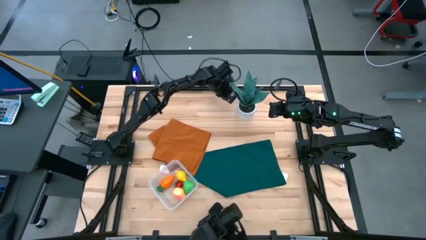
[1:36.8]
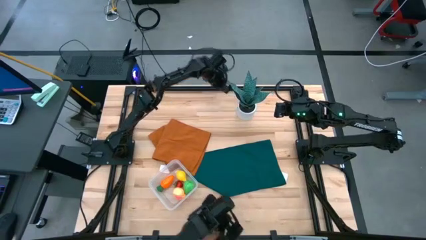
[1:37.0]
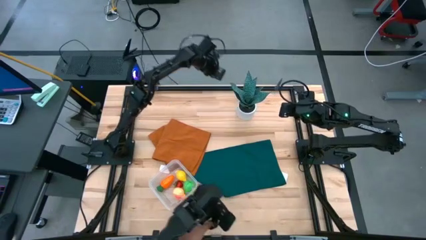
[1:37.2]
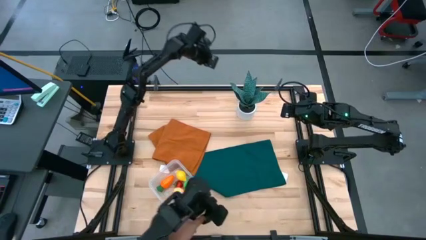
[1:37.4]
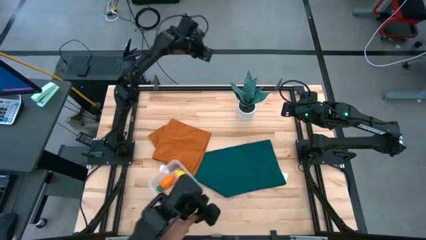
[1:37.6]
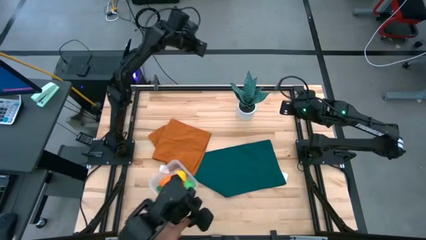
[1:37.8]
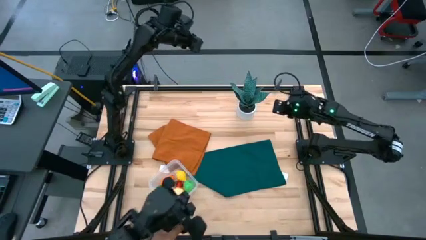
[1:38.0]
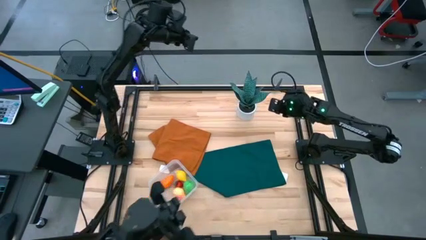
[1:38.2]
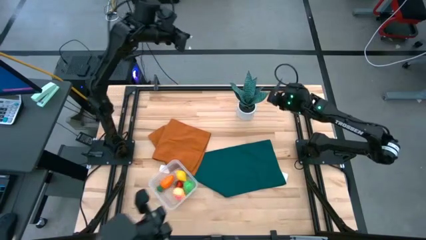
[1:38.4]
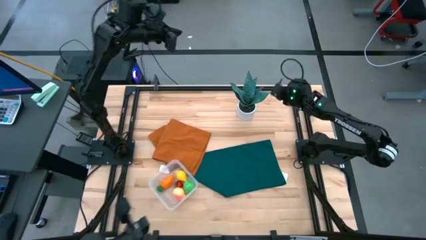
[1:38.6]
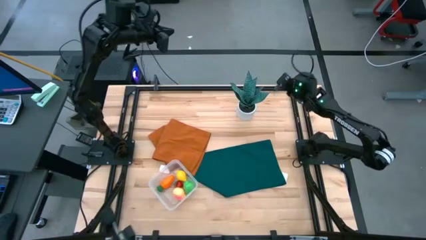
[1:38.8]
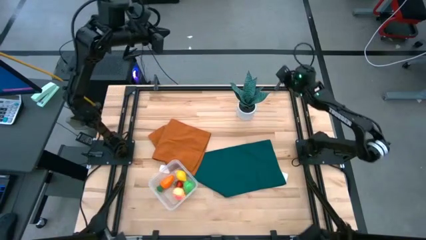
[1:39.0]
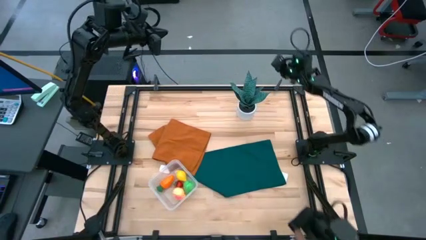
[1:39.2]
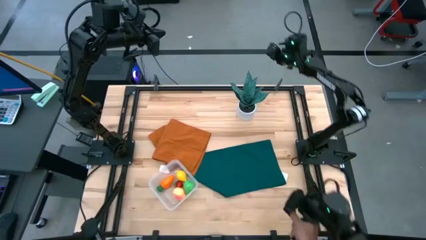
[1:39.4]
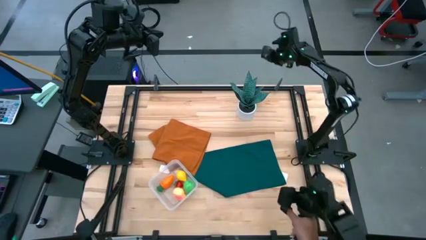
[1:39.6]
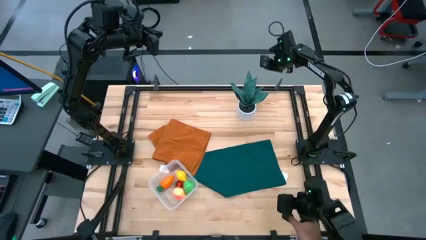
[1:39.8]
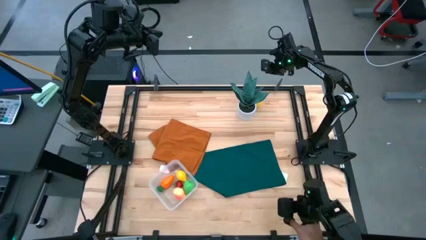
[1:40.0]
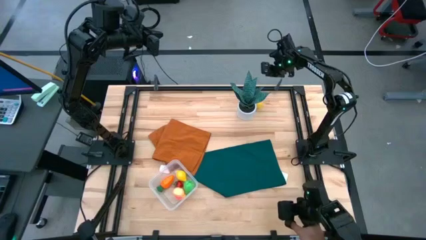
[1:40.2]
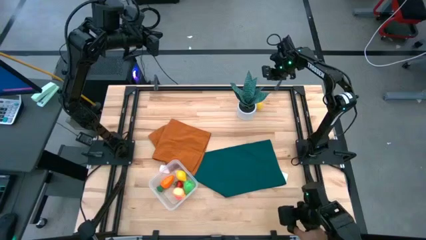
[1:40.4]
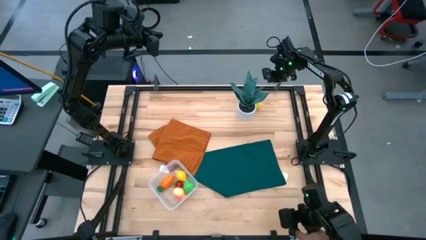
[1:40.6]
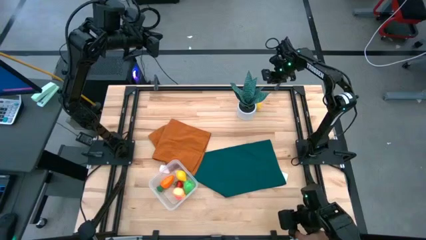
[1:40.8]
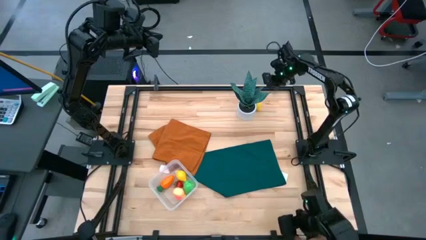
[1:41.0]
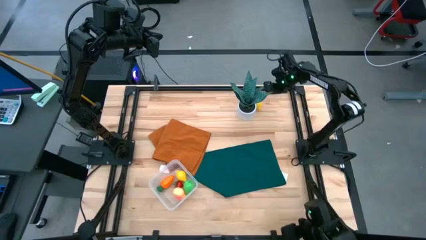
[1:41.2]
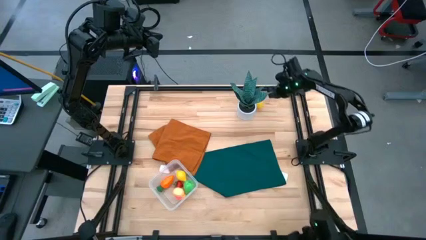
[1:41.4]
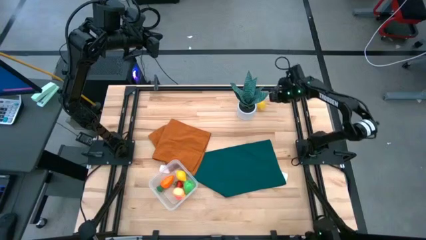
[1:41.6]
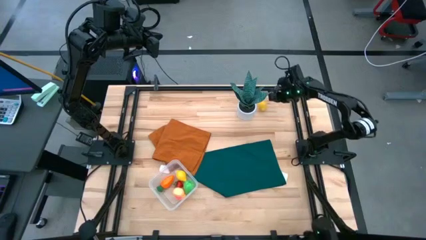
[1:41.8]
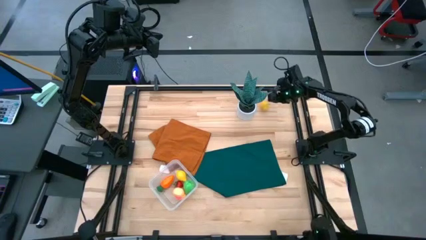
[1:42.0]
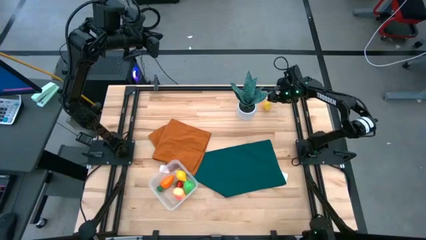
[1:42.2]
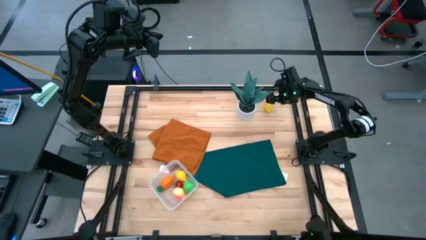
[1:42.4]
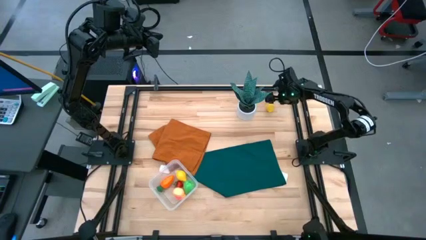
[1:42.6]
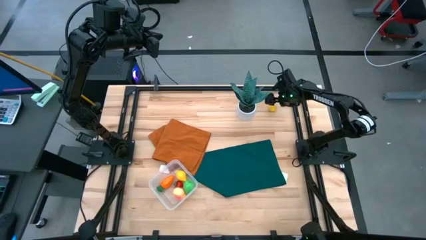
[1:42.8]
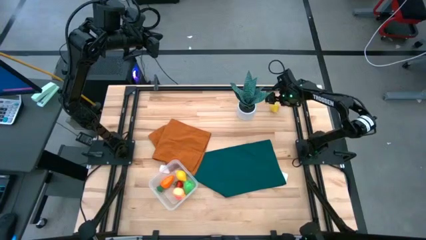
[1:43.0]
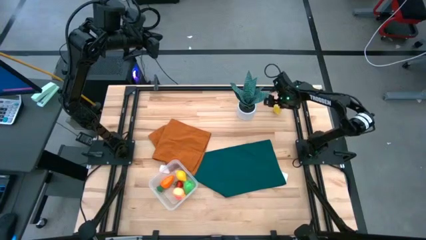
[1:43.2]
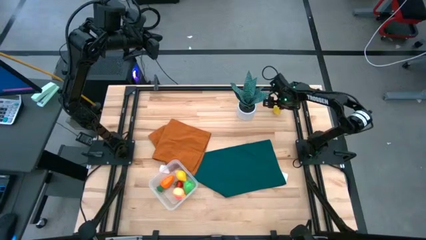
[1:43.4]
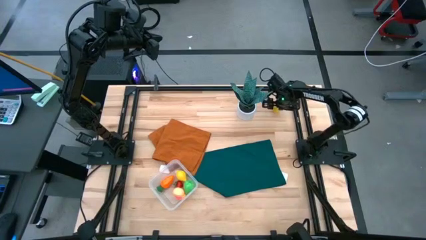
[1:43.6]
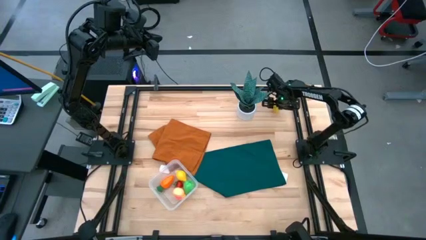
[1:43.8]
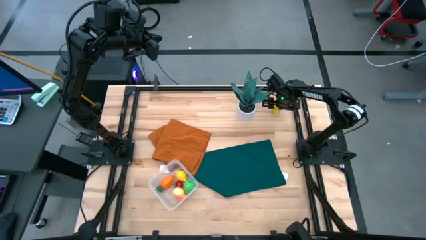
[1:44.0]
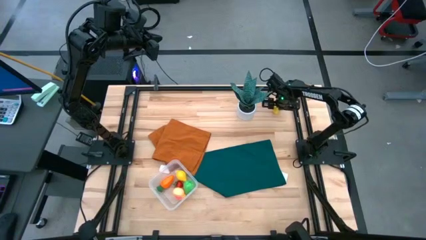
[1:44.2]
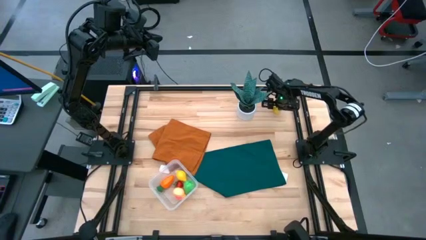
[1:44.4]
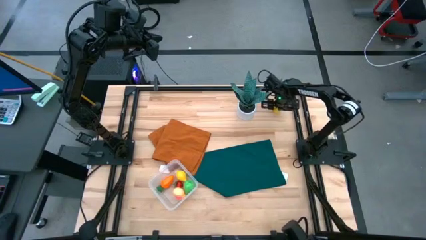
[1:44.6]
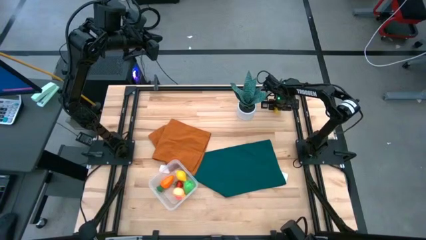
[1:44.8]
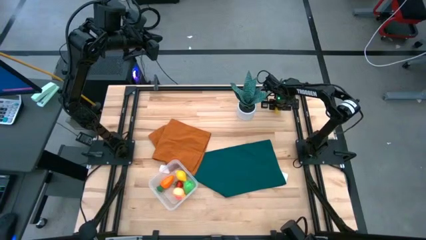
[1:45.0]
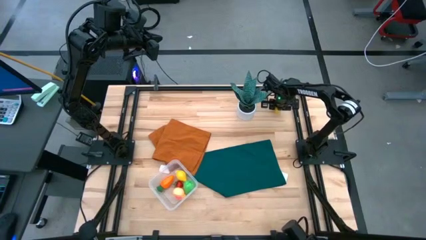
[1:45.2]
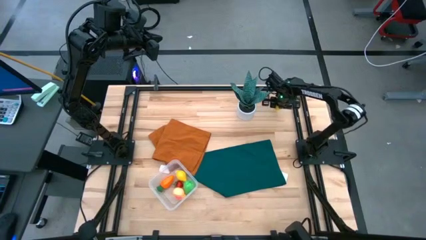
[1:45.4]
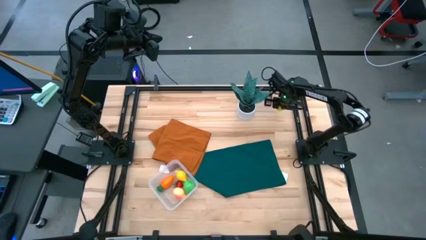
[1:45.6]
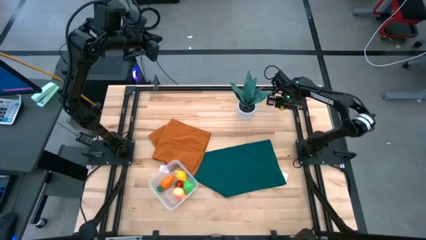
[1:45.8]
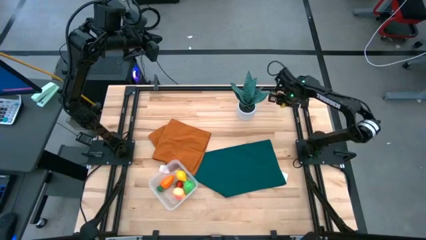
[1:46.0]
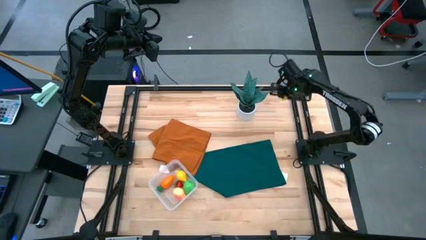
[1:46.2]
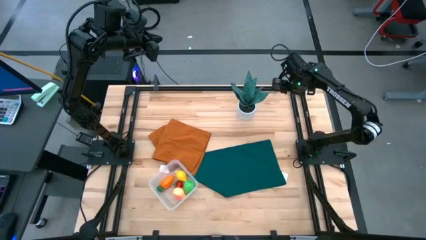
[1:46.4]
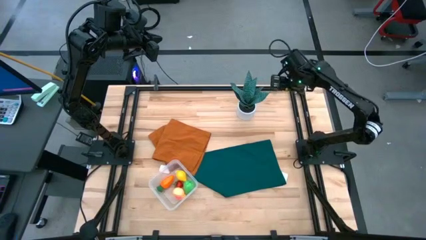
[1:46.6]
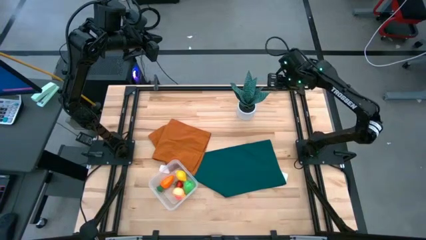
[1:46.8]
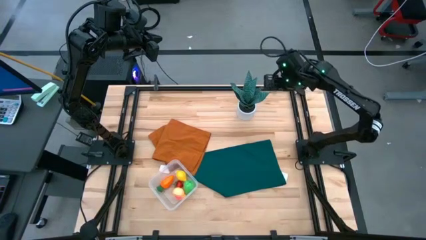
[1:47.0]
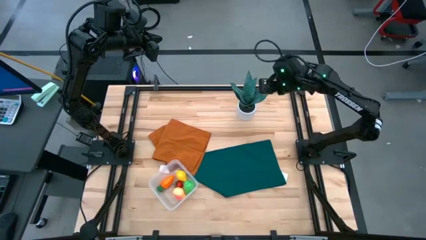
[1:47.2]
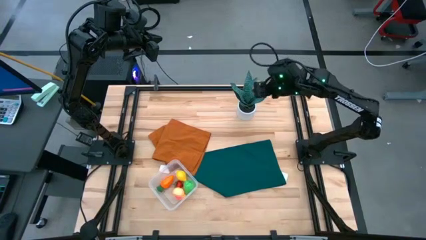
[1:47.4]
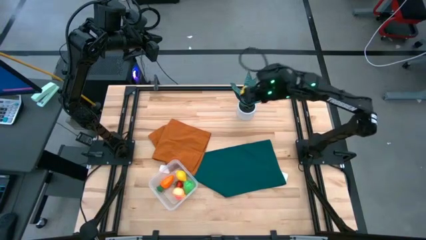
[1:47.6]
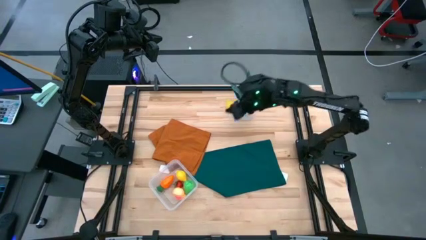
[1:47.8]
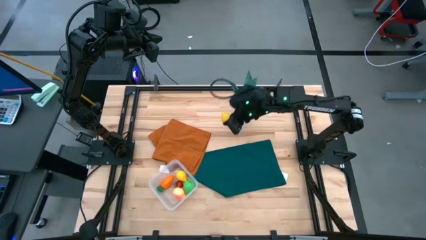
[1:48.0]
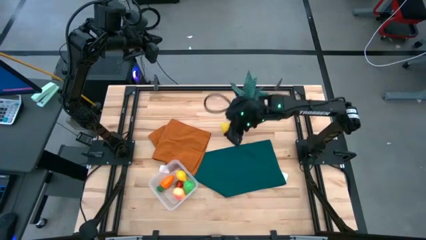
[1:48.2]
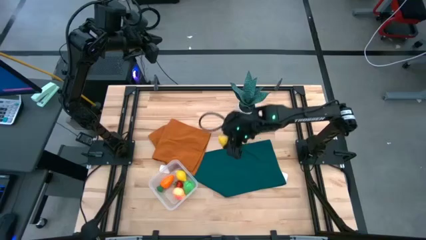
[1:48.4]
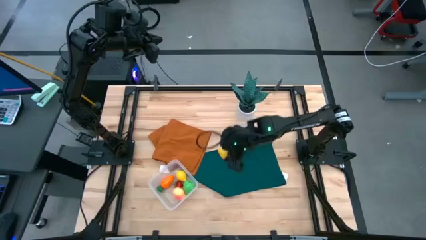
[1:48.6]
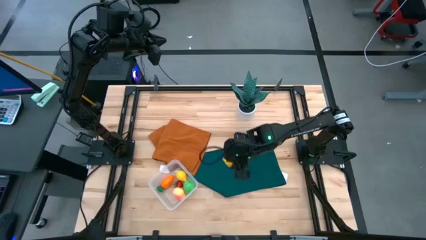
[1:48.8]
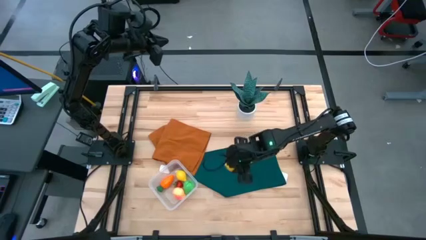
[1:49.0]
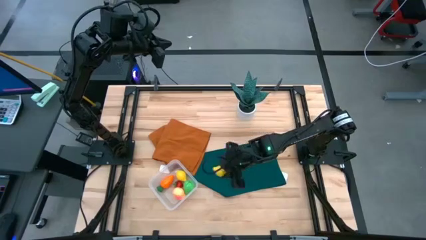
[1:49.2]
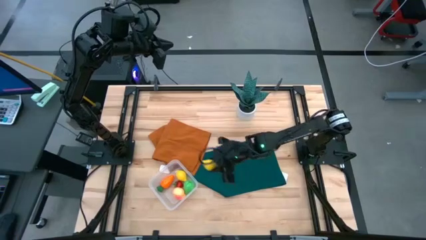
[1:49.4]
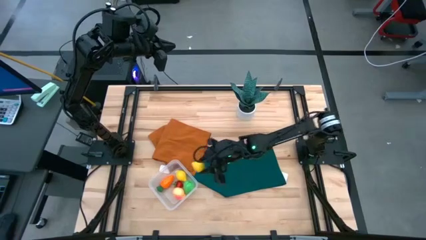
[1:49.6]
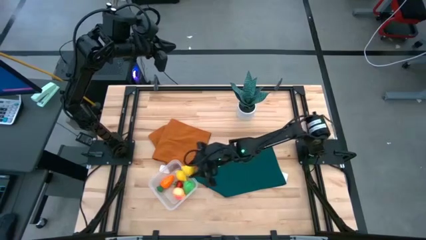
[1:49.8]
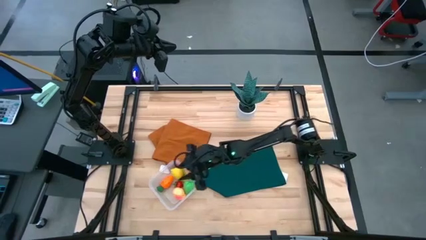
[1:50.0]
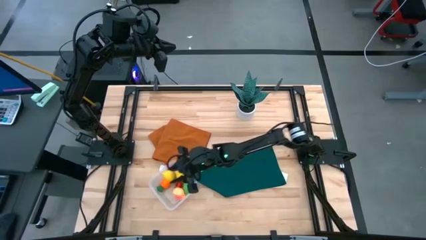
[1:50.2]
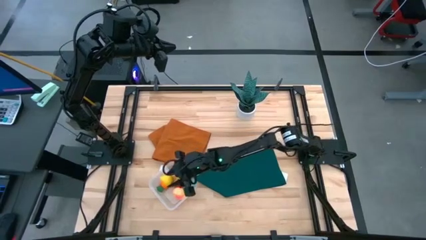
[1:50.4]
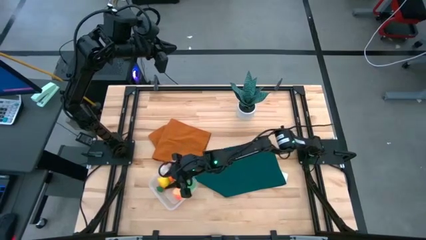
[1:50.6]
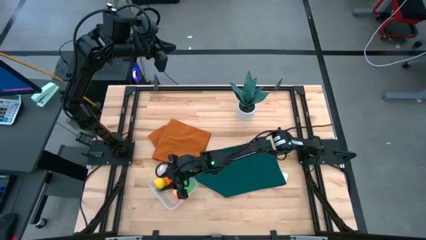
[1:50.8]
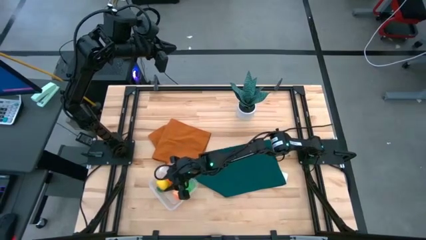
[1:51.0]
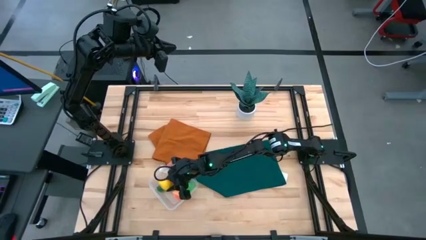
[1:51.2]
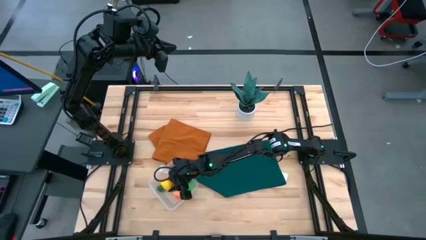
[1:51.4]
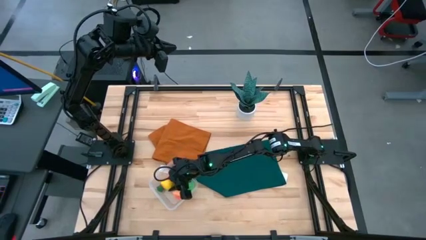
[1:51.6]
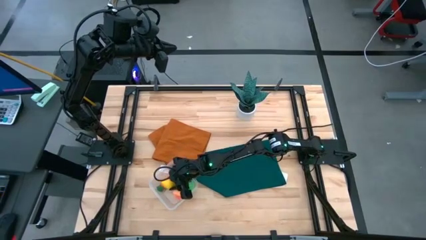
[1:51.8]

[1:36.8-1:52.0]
Task: Pick and placing Produce into tupperware
Put the lemon into the transparent container
